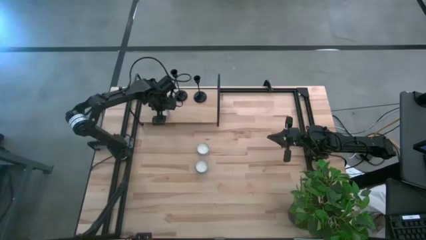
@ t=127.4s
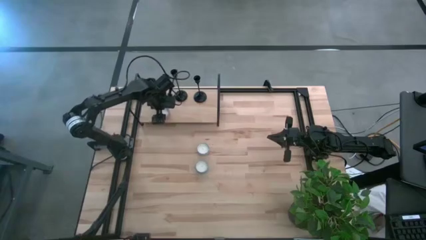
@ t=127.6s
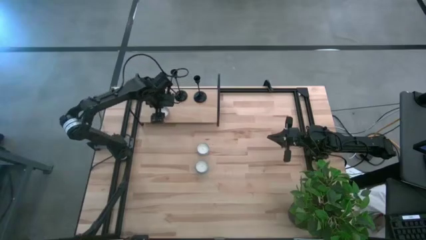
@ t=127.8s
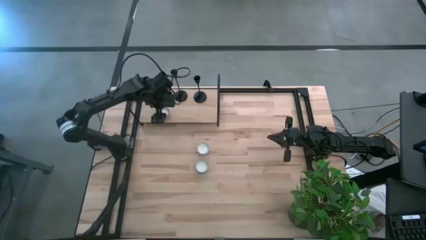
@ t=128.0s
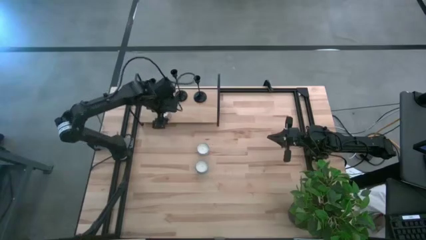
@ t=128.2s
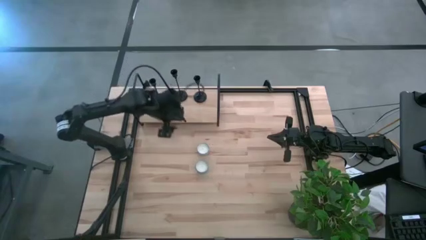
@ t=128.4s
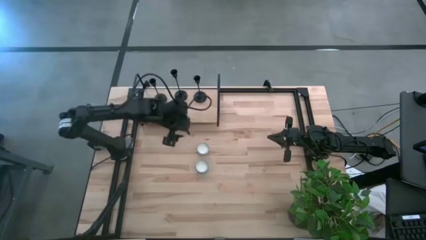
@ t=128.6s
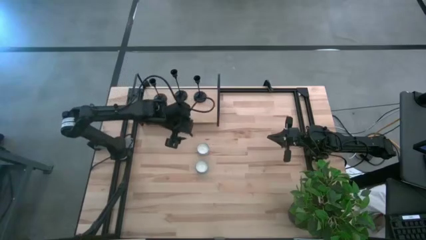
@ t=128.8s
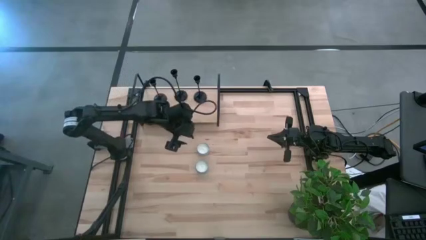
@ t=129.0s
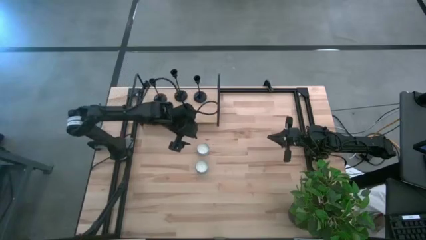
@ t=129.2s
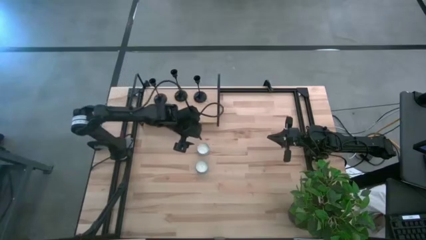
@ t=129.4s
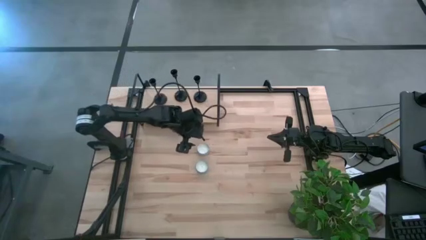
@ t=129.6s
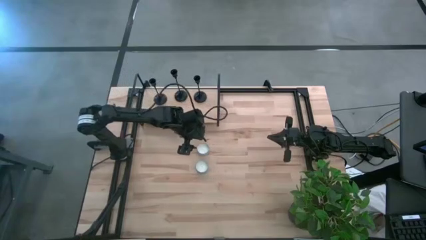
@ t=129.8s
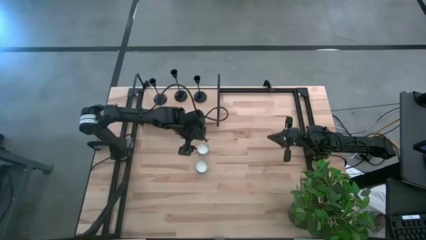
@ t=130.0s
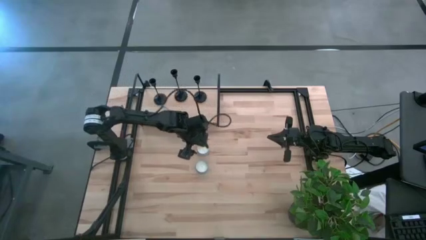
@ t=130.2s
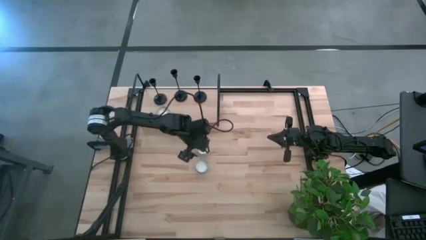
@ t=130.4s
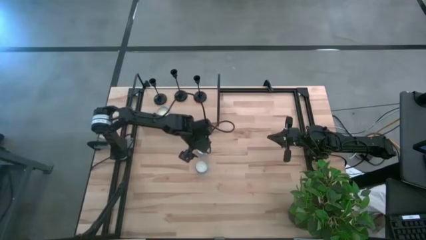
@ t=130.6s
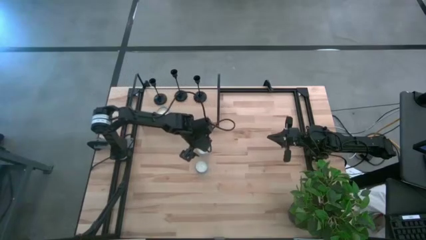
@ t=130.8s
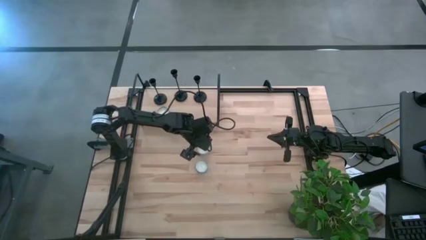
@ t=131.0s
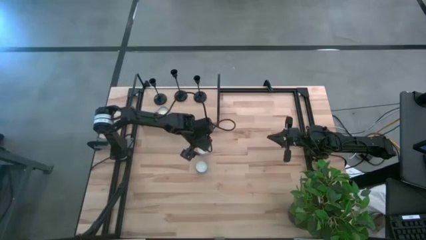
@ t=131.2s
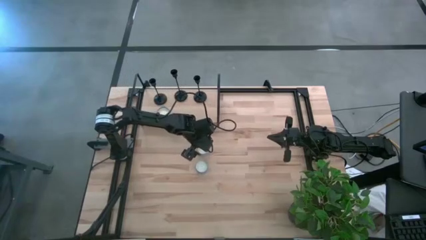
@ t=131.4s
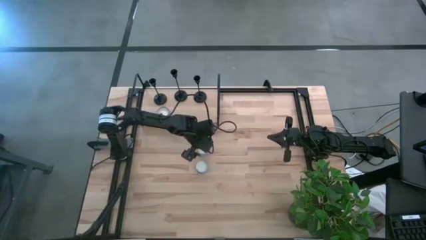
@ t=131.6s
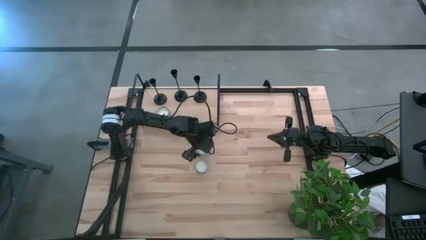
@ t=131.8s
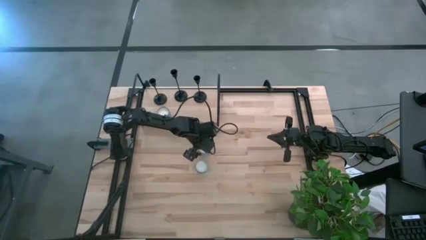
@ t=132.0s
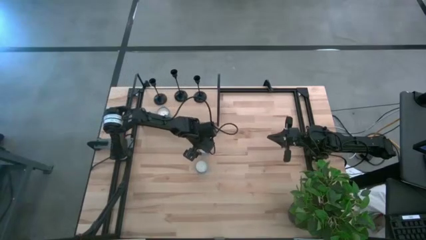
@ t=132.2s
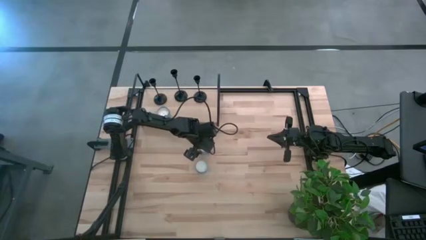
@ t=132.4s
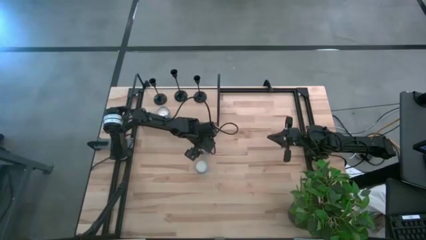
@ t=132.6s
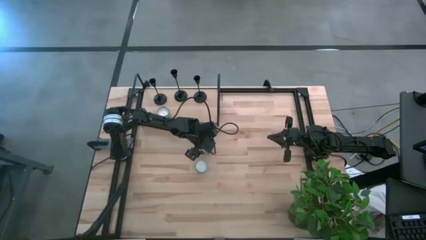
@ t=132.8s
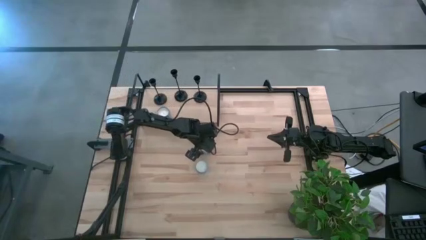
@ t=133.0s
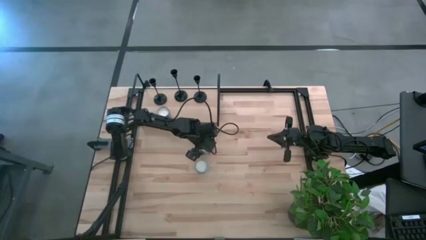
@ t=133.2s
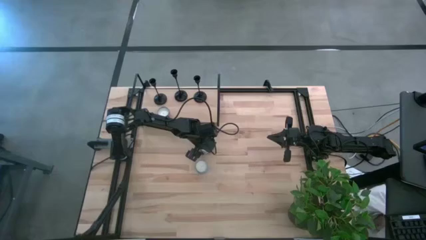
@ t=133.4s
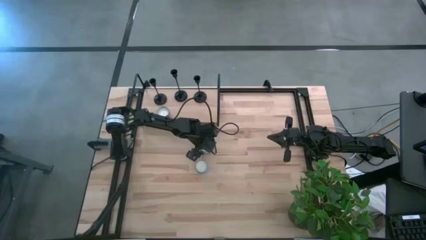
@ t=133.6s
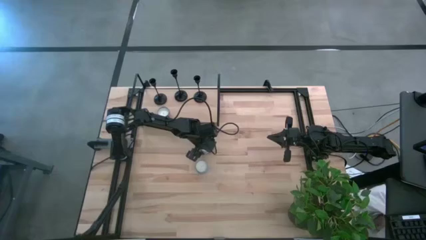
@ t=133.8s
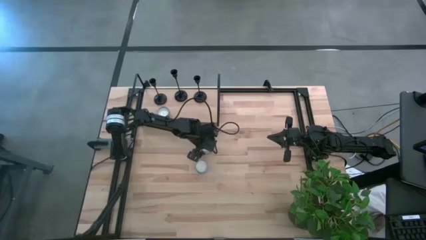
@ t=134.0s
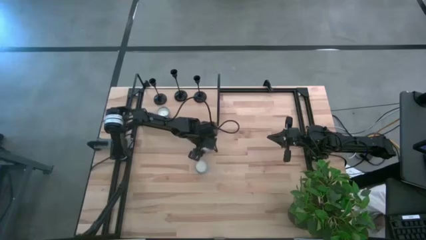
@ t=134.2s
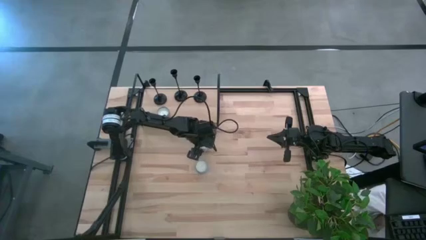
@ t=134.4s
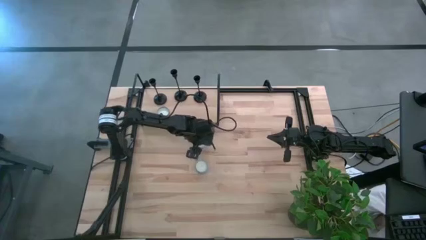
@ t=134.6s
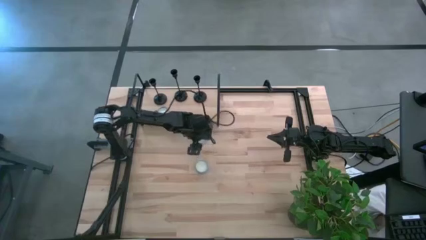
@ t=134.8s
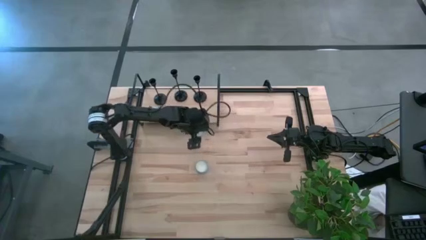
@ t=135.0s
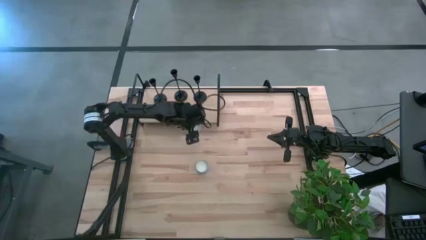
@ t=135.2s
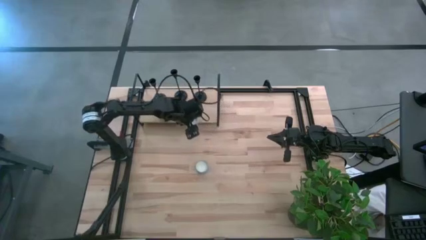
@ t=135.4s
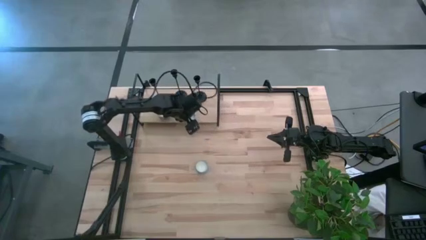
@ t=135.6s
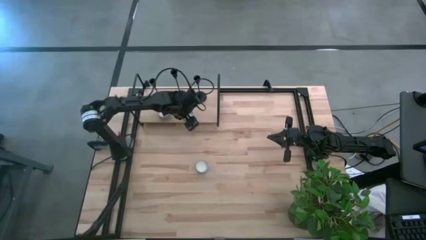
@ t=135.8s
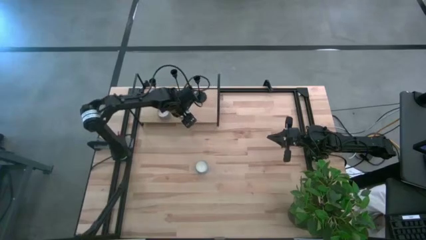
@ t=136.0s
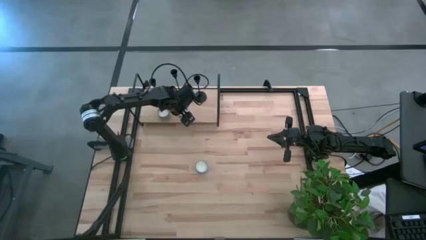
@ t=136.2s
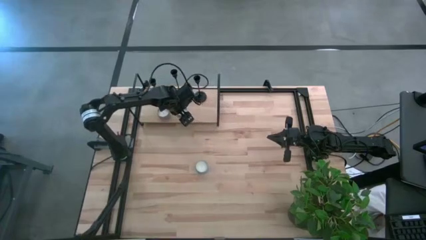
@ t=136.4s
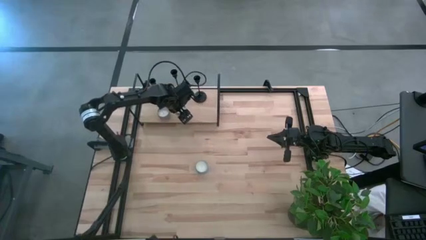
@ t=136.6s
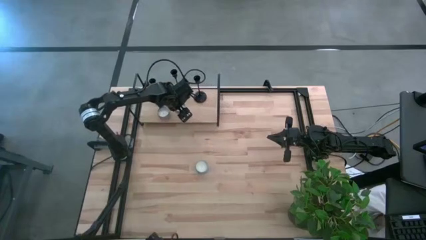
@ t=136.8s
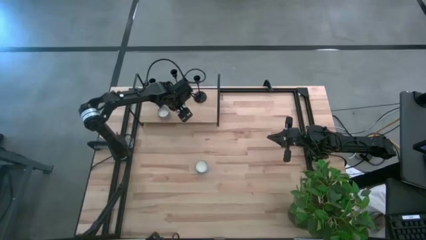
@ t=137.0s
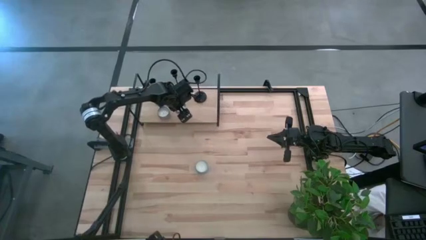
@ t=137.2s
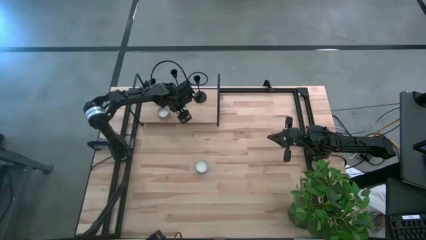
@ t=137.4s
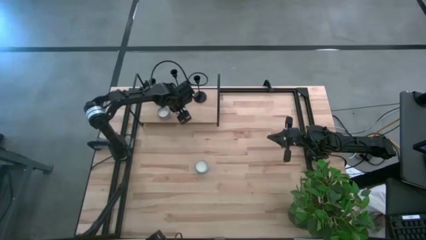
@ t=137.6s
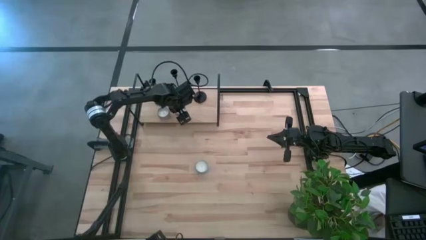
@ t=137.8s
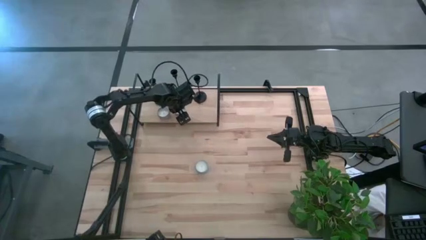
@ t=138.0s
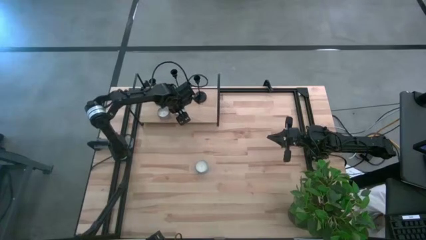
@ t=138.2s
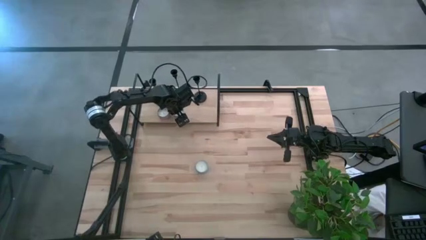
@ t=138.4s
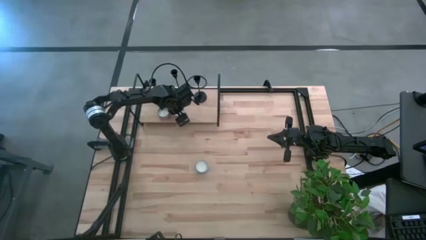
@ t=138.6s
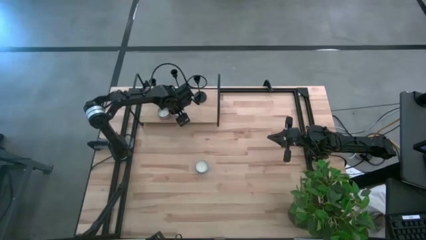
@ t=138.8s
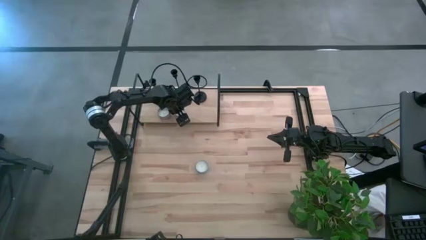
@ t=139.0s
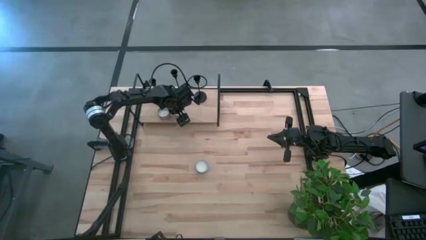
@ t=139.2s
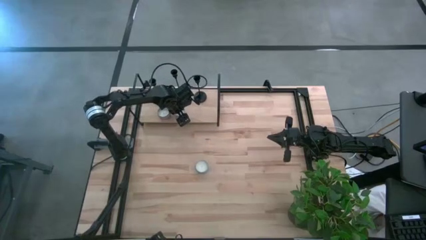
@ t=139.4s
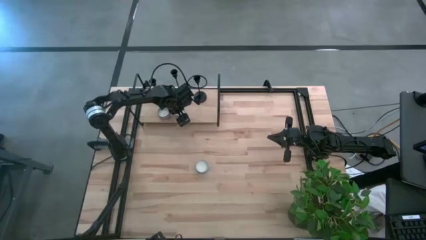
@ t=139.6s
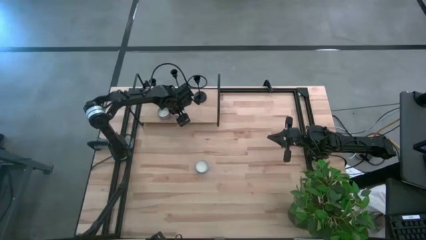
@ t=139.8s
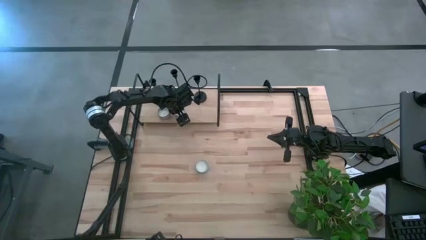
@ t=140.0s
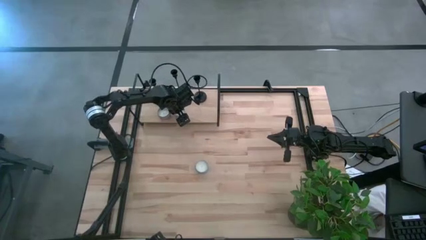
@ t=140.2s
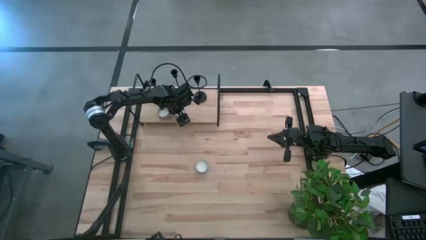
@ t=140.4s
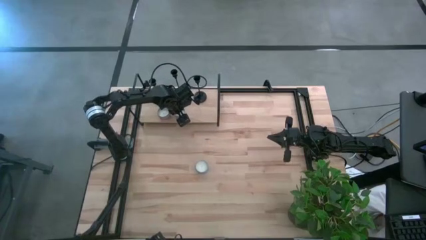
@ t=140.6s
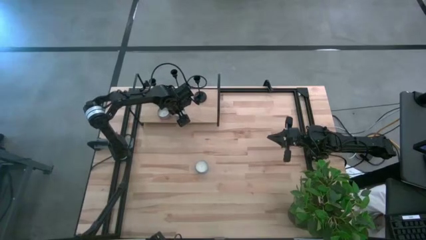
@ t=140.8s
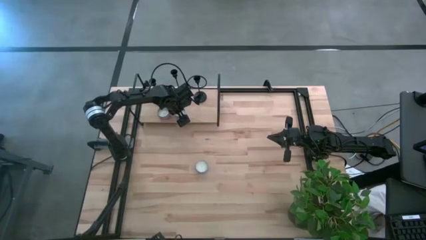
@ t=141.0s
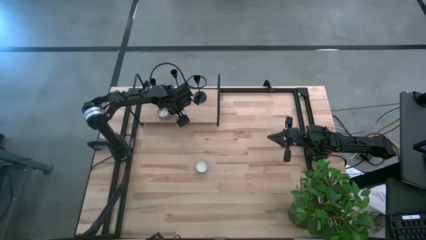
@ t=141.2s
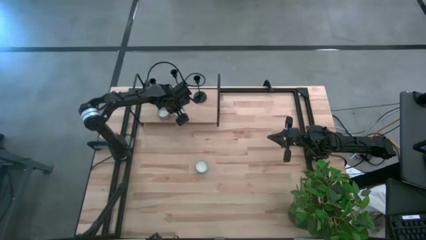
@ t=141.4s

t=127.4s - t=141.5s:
Task: Pick & Place candle stick holders
Align the white scented candle with the pink scented candle on the shelf
